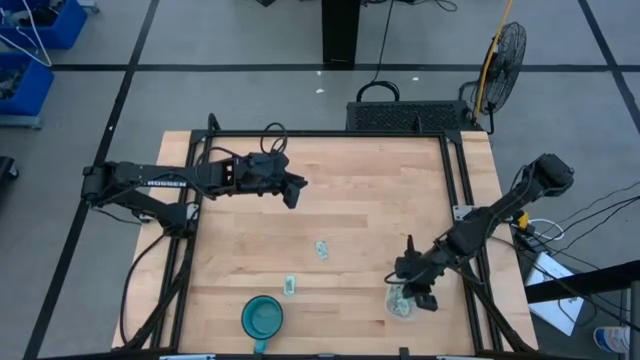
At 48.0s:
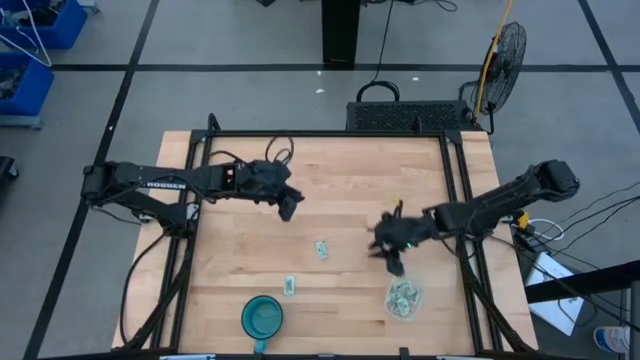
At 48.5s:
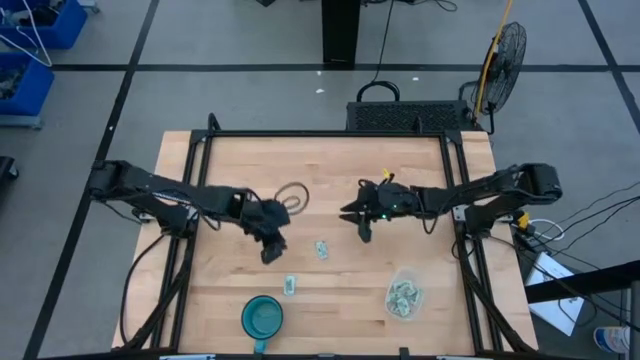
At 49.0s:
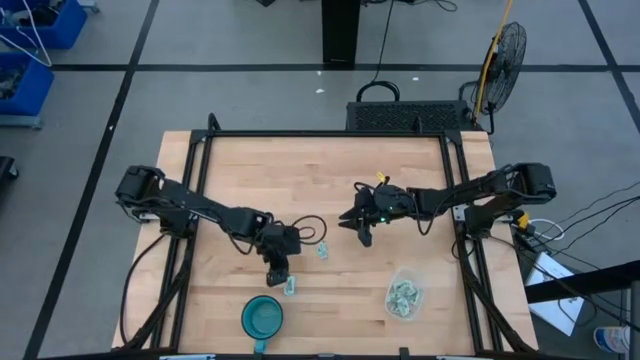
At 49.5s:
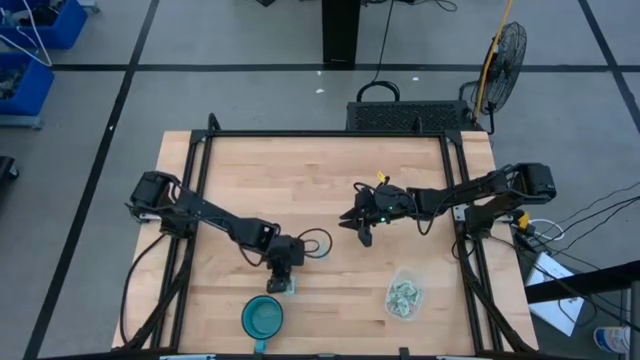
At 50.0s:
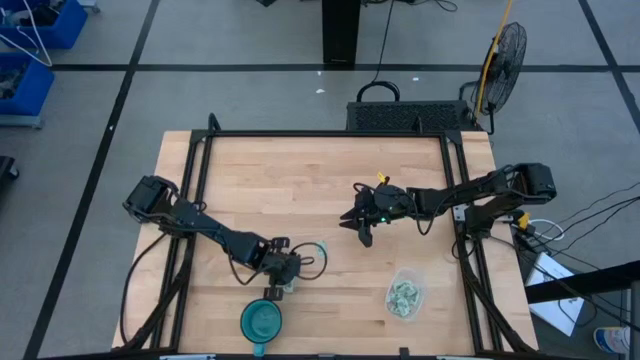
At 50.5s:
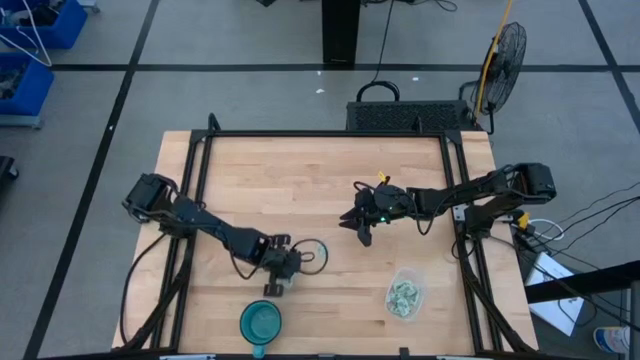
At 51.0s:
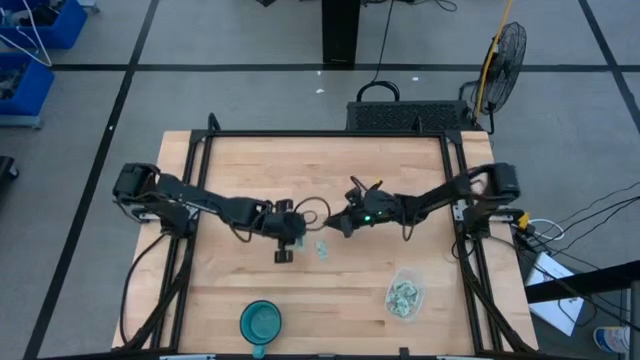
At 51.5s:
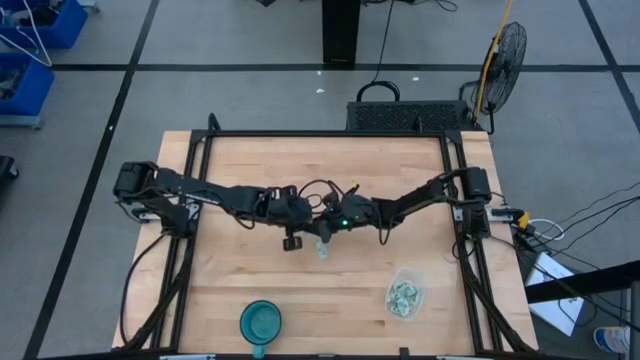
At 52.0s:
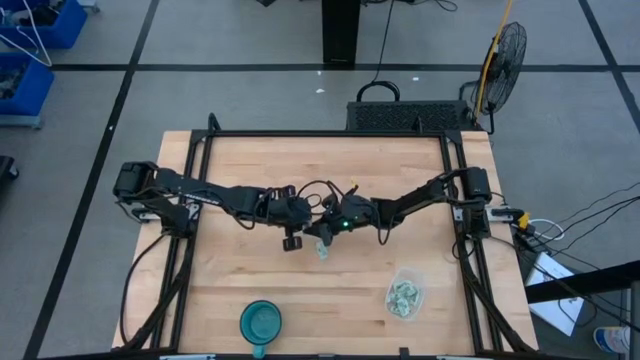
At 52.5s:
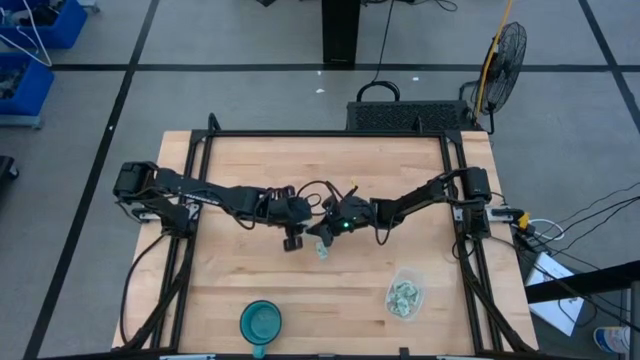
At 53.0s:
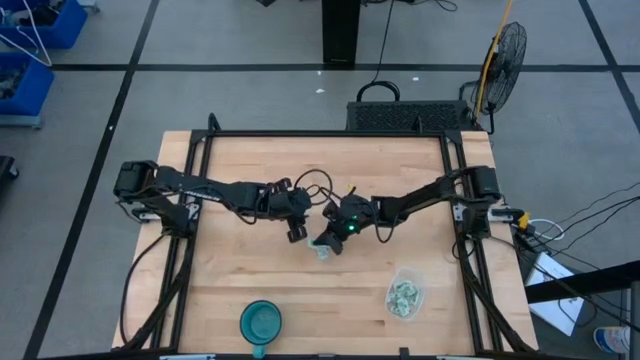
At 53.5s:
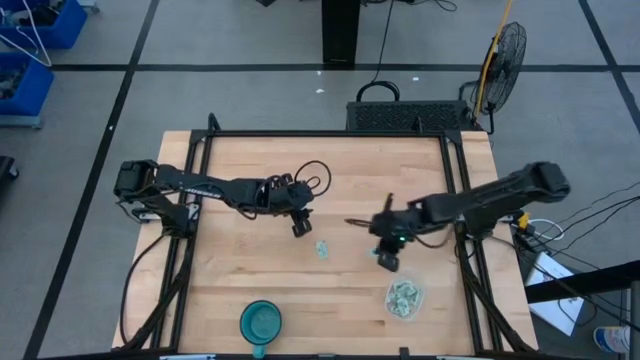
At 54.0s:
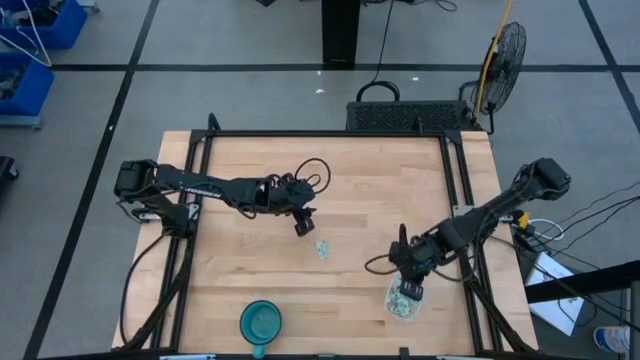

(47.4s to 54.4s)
Task: Pick and place Stevia / Truvia into bins
Put the bottom light green stevia packet into the transparent bin

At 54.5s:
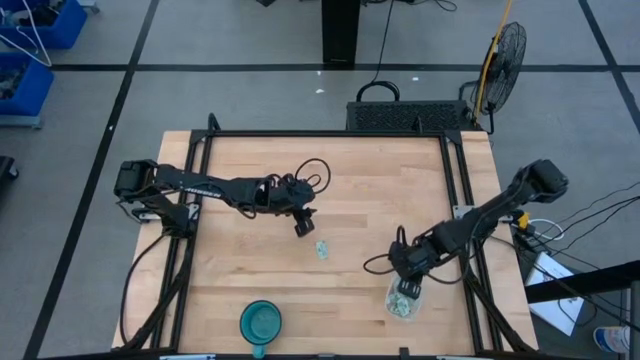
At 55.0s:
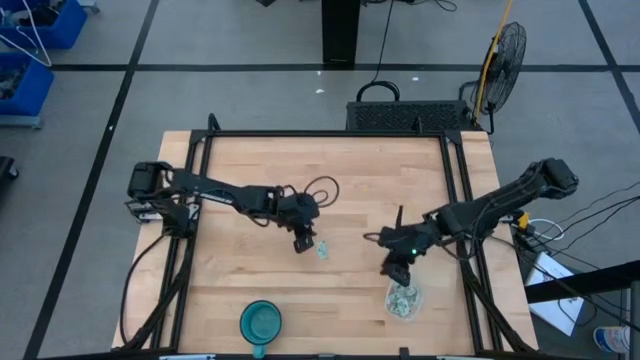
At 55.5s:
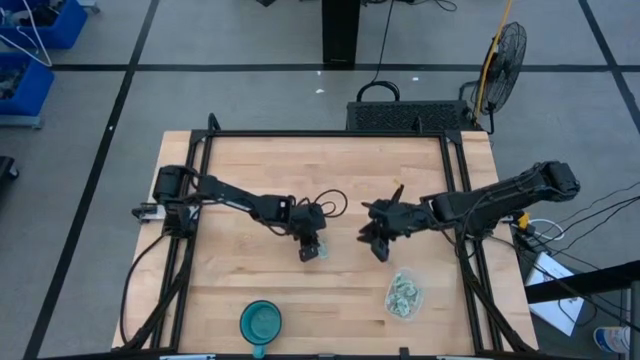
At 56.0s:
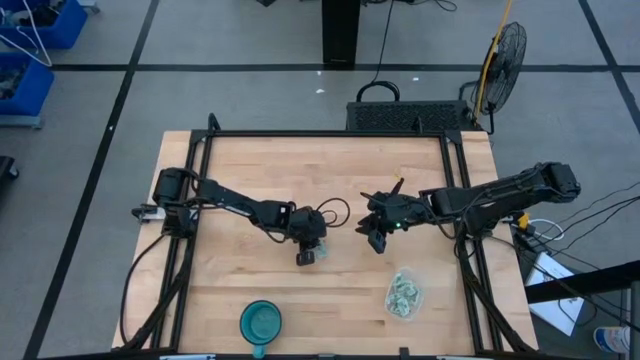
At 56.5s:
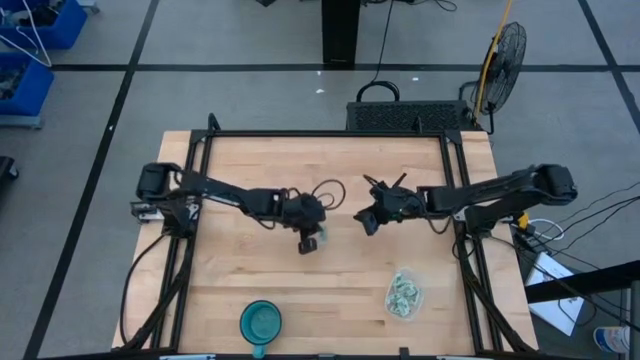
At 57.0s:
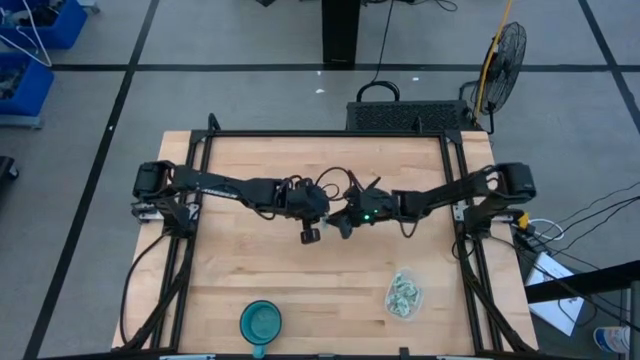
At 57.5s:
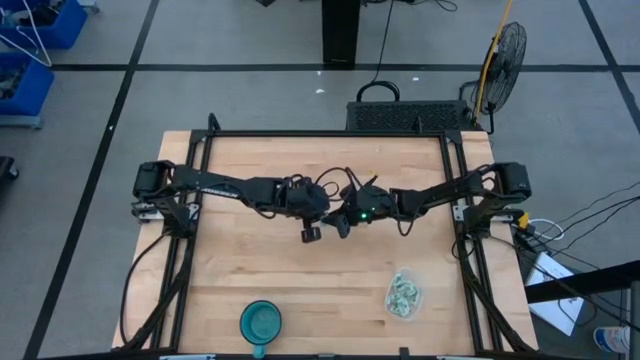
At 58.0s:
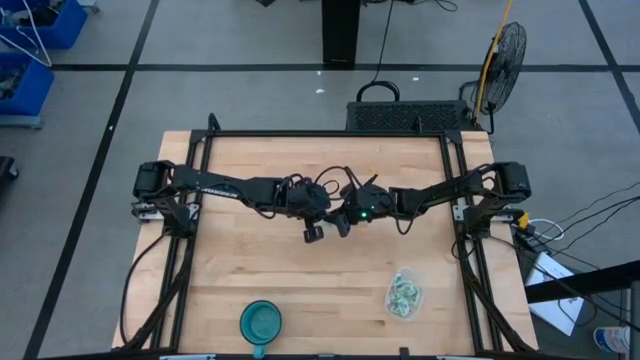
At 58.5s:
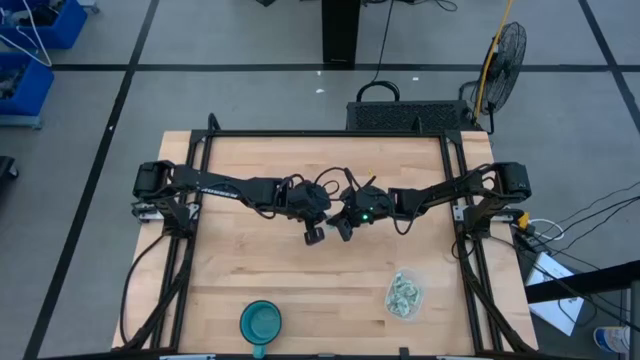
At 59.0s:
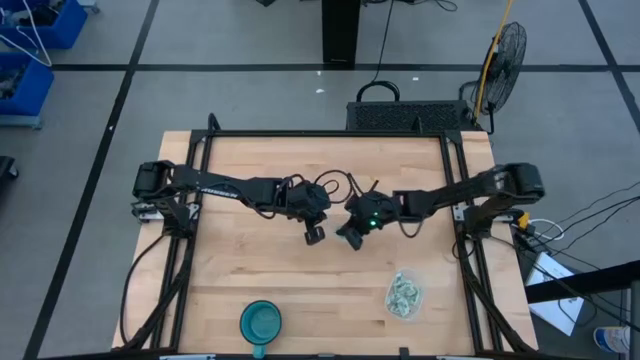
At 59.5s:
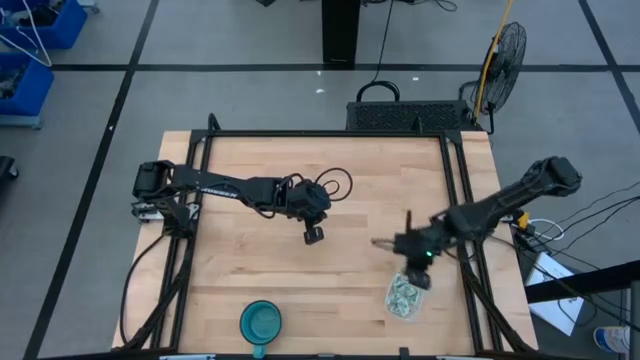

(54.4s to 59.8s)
Put the light green stevia packet into the transparent bin

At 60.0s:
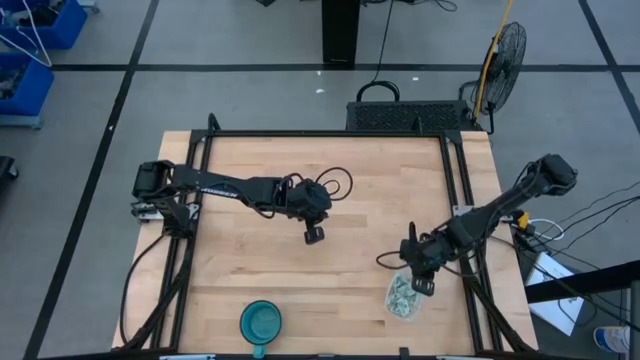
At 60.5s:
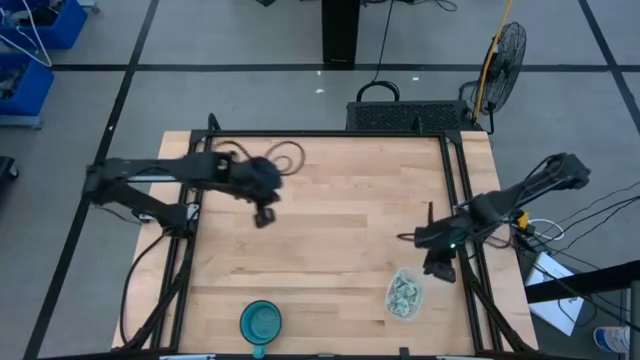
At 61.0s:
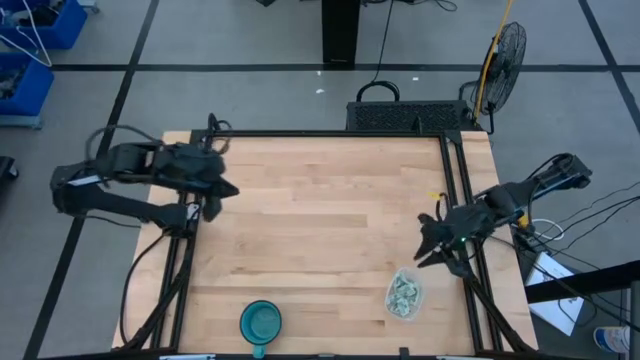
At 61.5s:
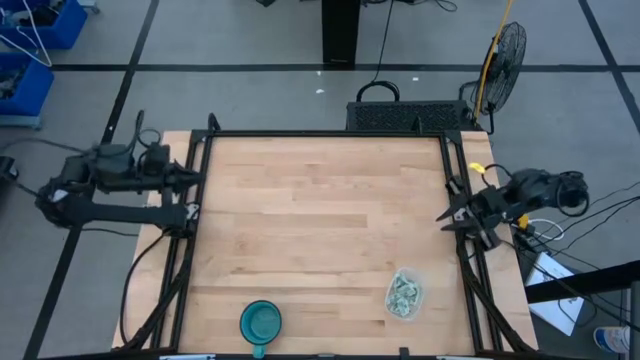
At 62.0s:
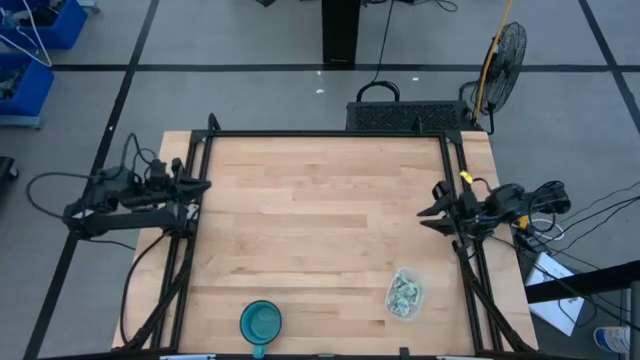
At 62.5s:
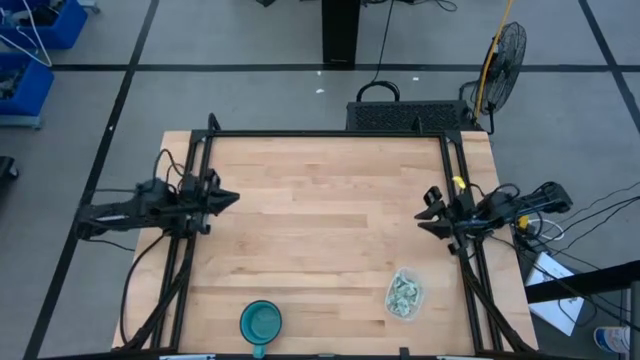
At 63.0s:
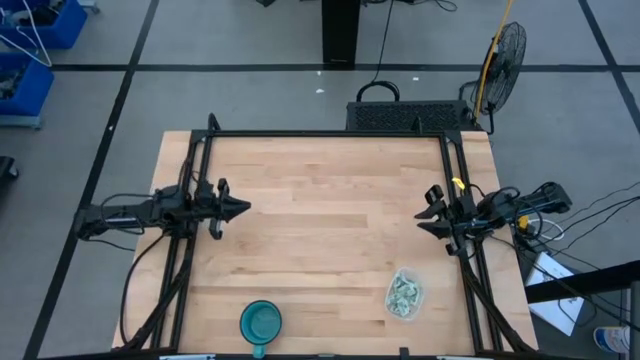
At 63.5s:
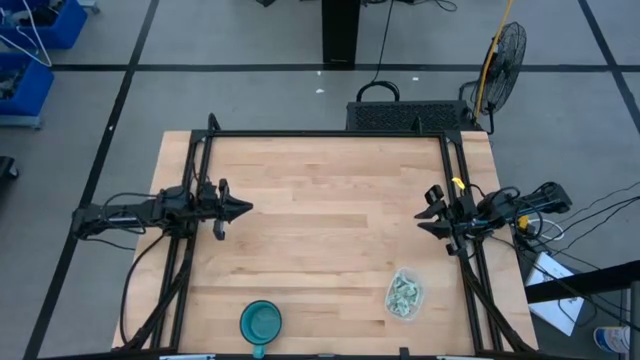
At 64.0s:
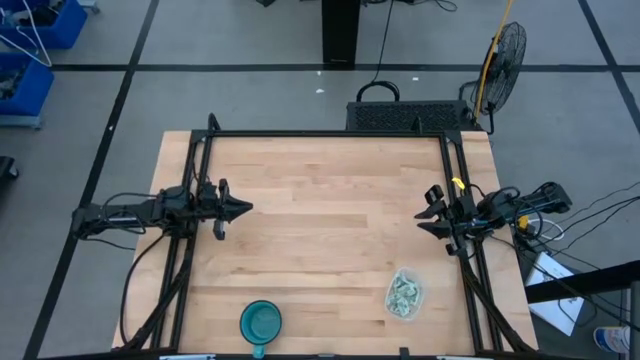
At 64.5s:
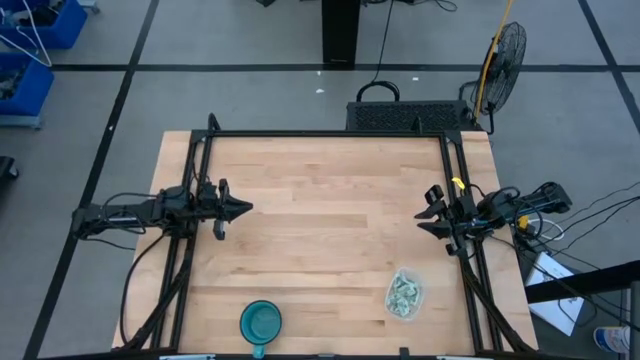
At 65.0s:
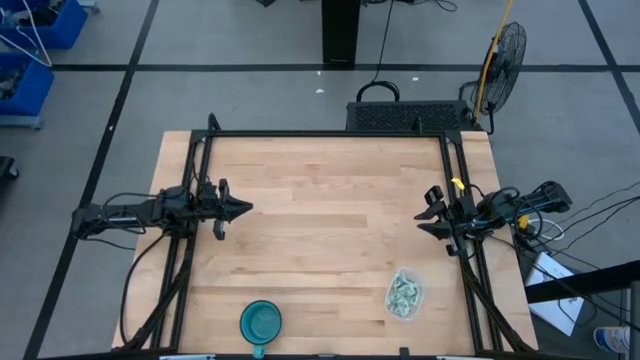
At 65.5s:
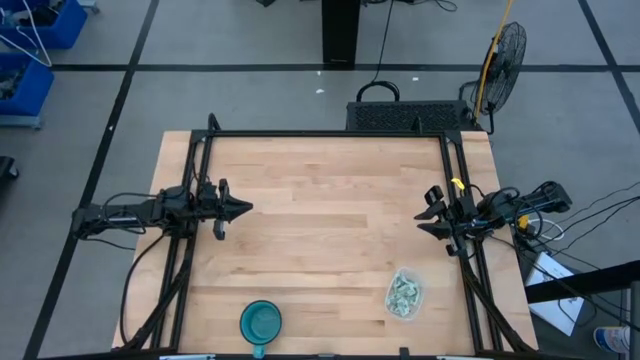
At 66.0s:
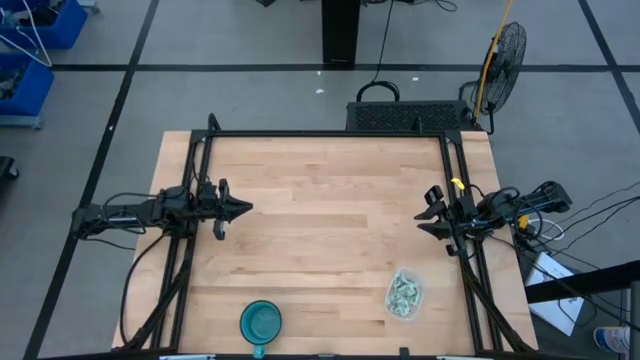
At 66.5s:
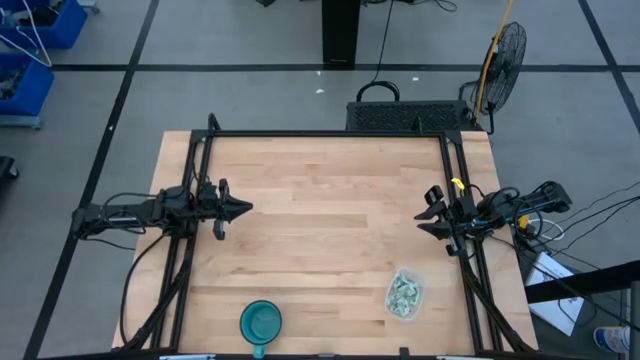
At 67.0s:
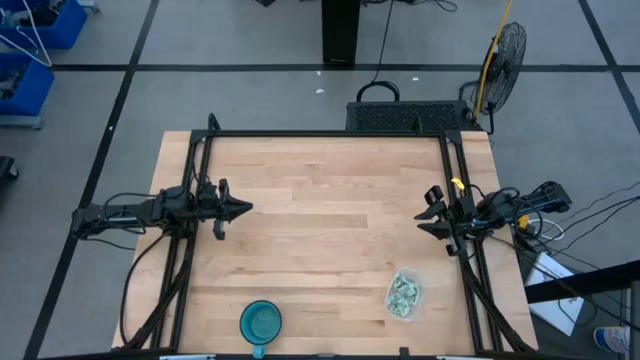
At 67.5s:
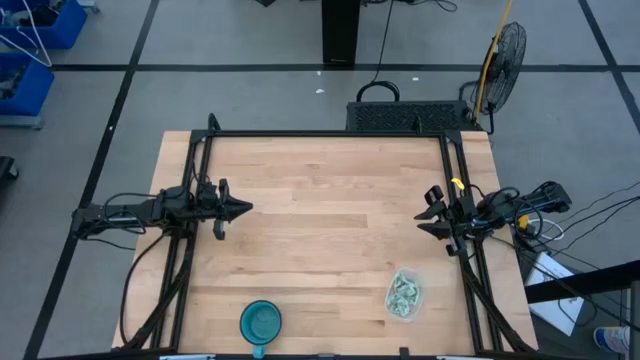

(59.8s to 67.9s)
Return to Home Position

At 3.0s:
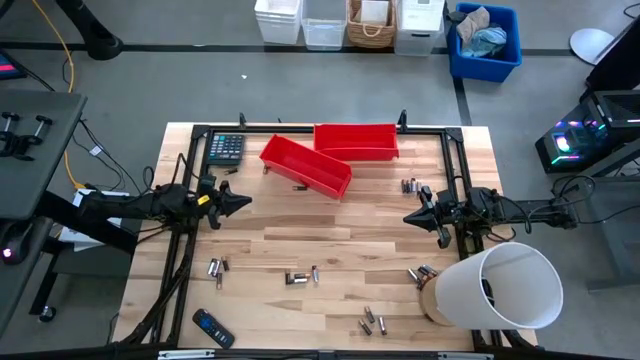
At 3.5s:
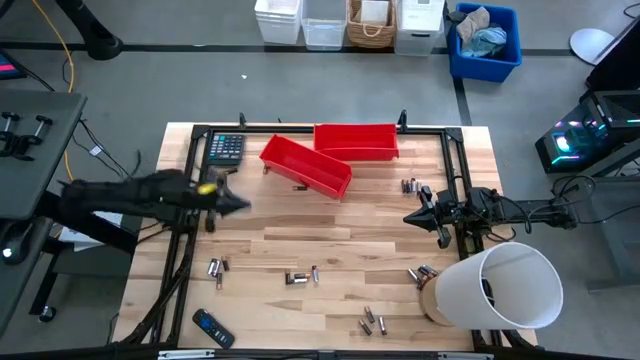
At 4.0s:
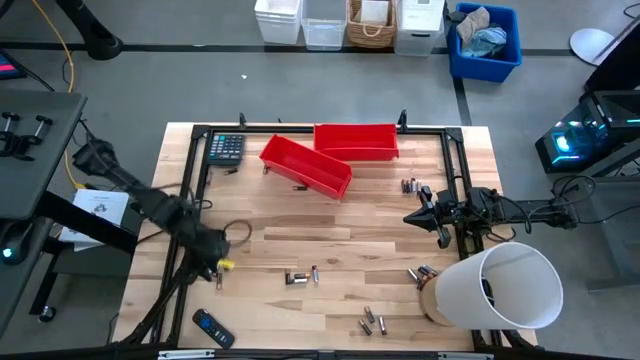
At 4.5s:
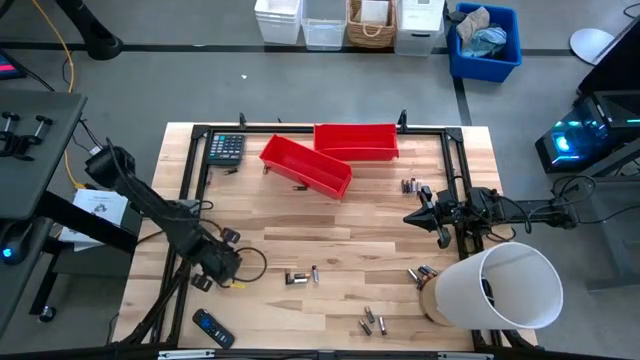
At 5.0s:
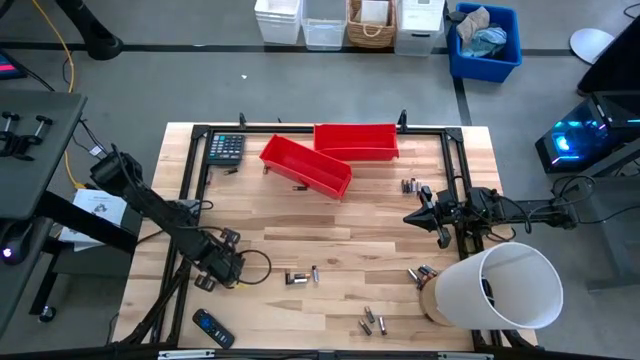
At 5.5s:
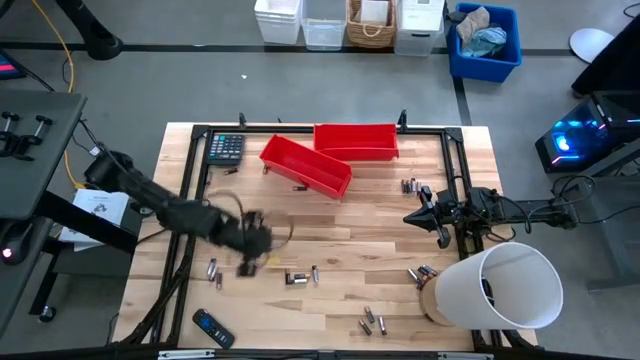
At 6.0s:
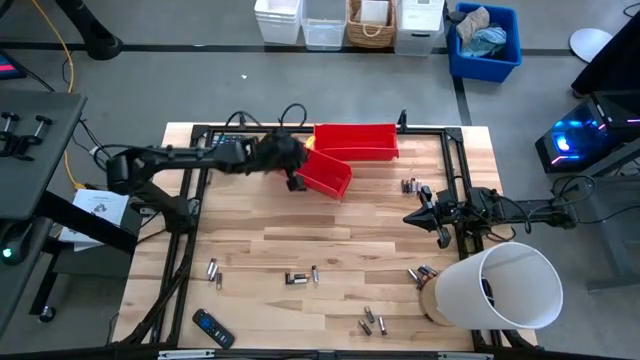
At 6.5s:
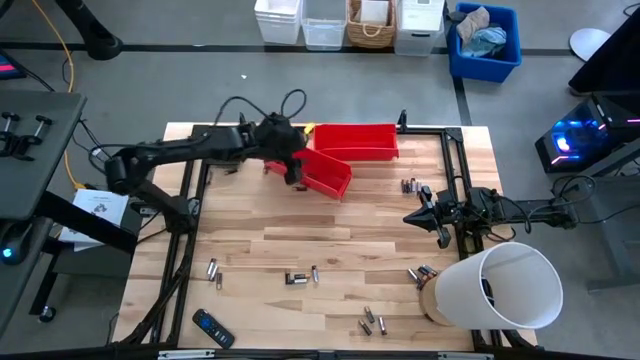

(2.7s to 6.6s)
Task: Sort batteries
Put the black battery into the bottom red bin
